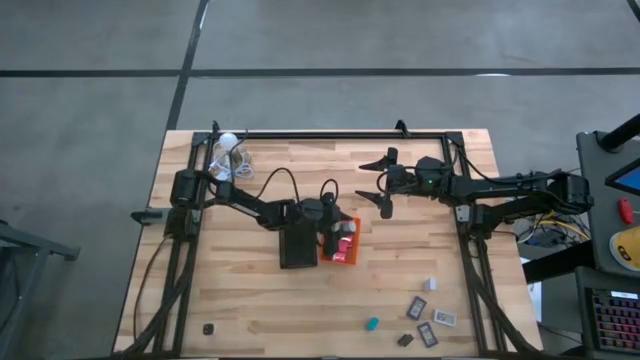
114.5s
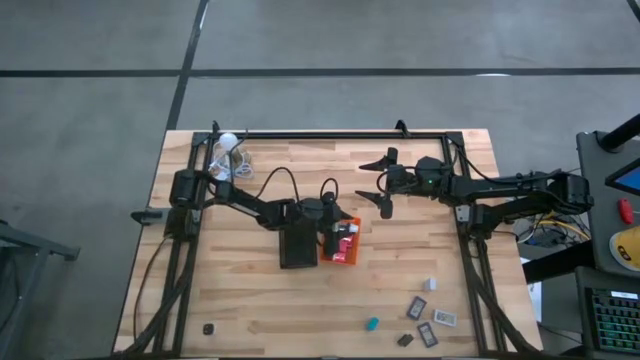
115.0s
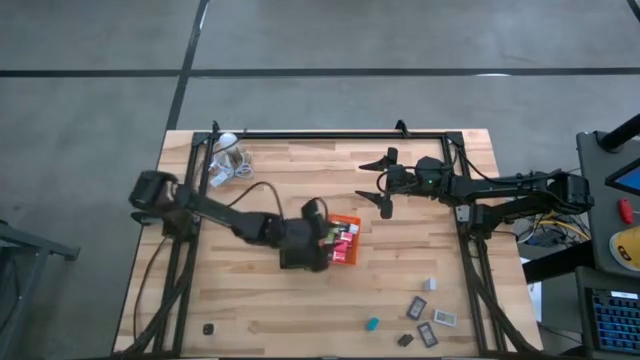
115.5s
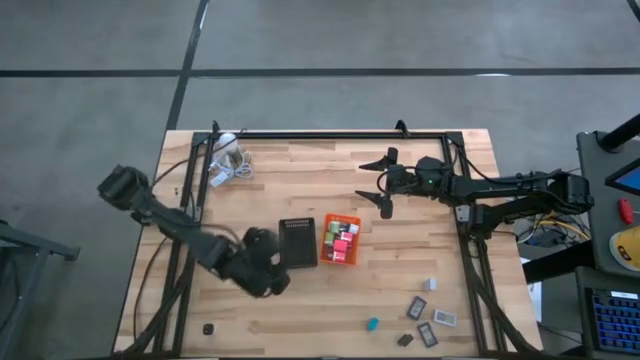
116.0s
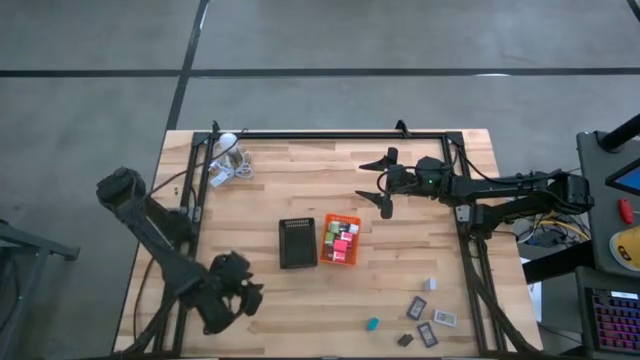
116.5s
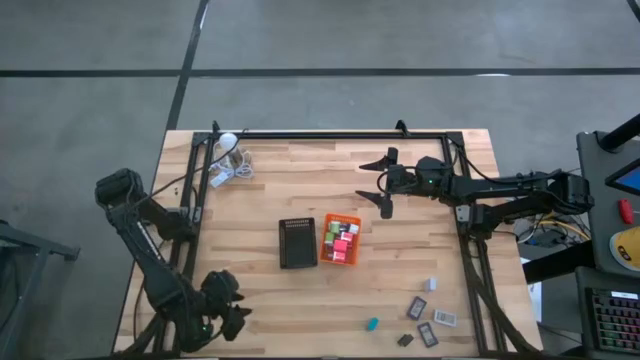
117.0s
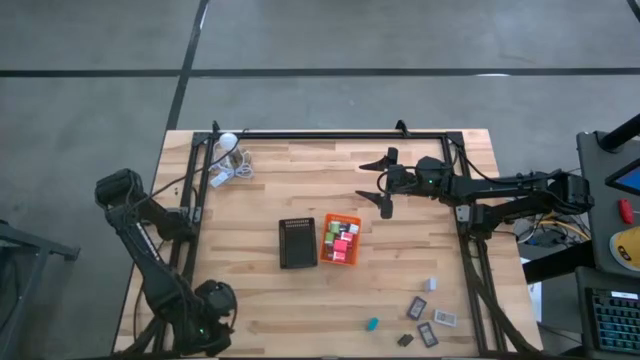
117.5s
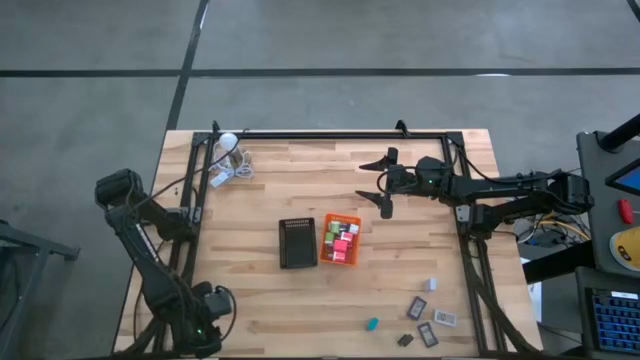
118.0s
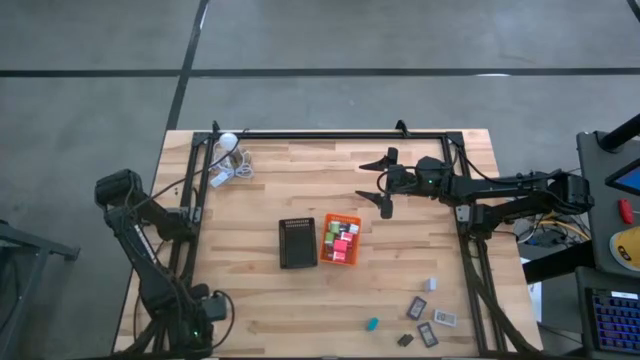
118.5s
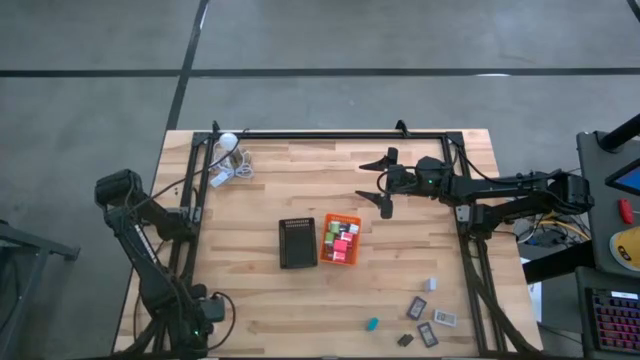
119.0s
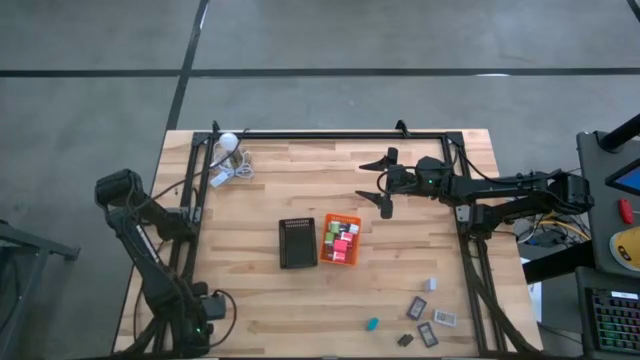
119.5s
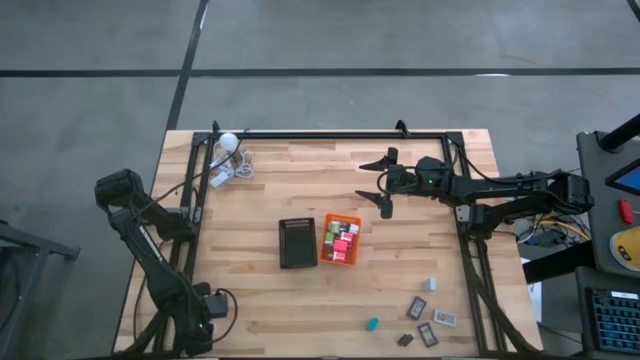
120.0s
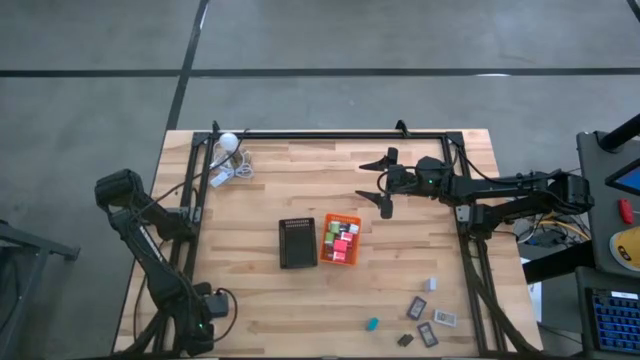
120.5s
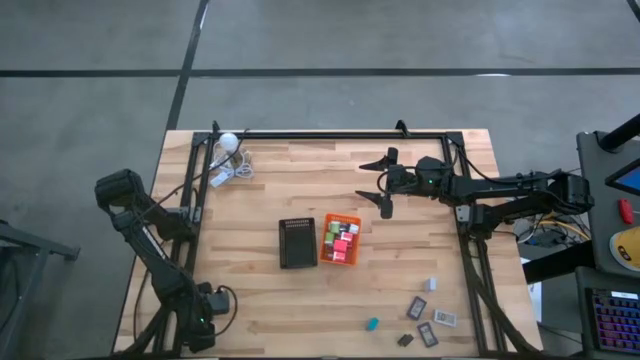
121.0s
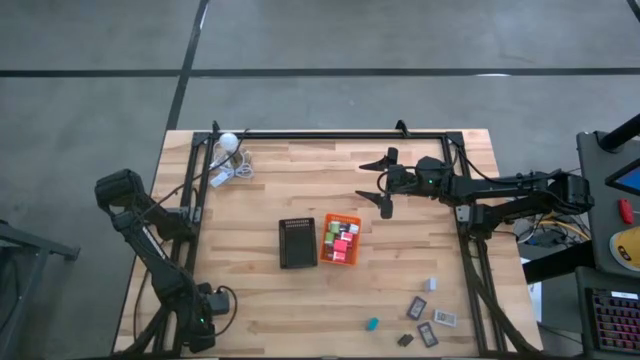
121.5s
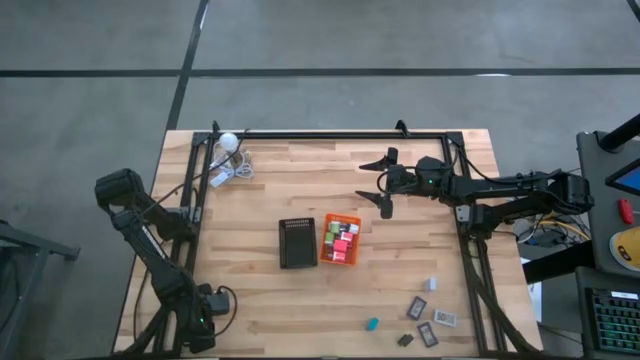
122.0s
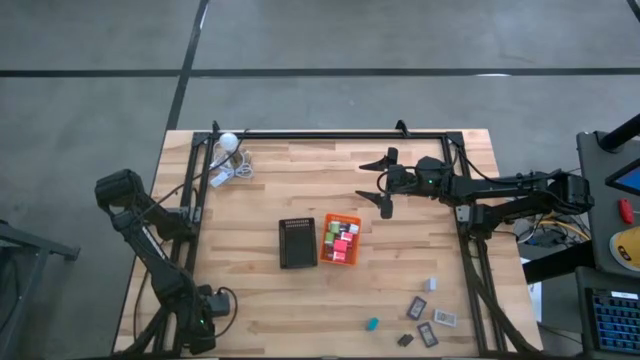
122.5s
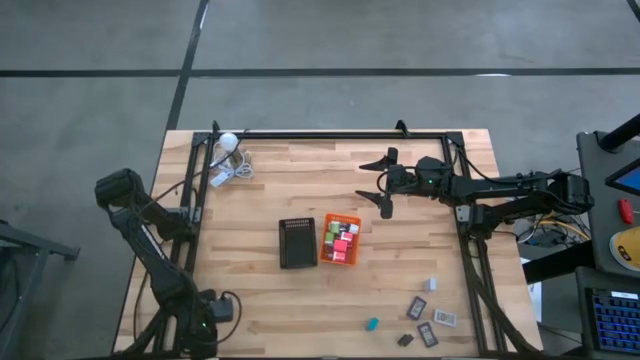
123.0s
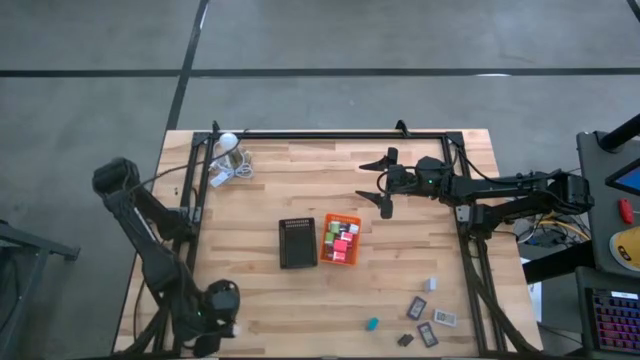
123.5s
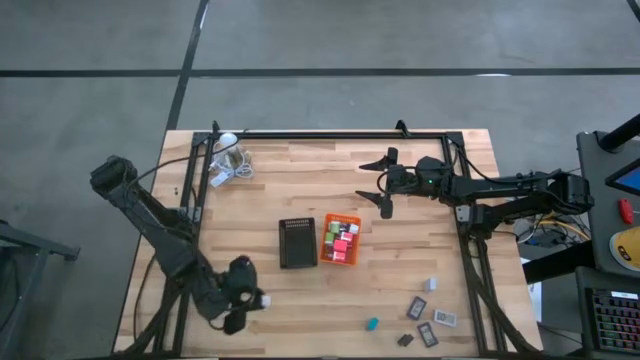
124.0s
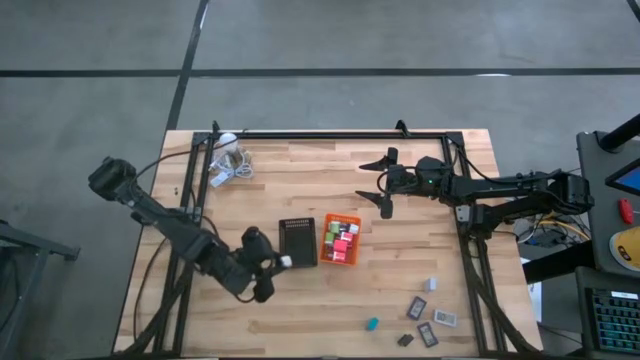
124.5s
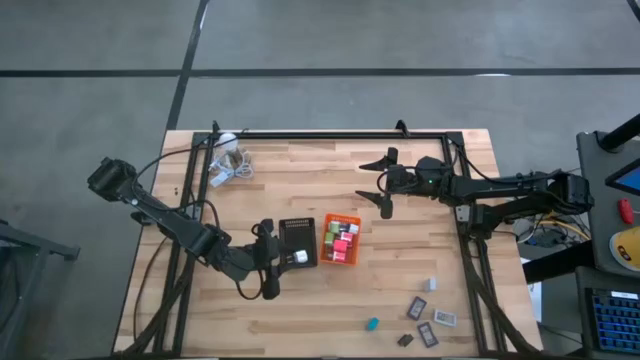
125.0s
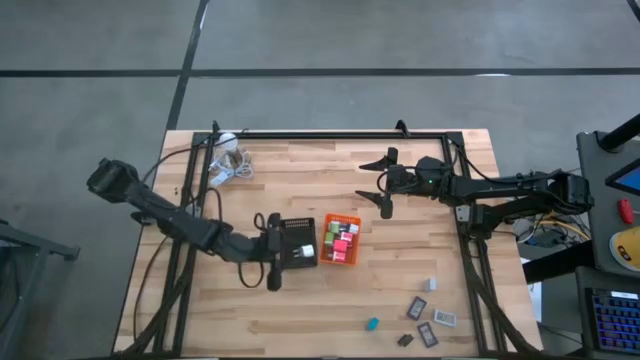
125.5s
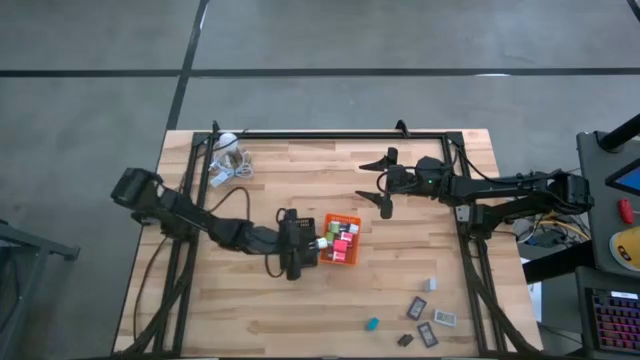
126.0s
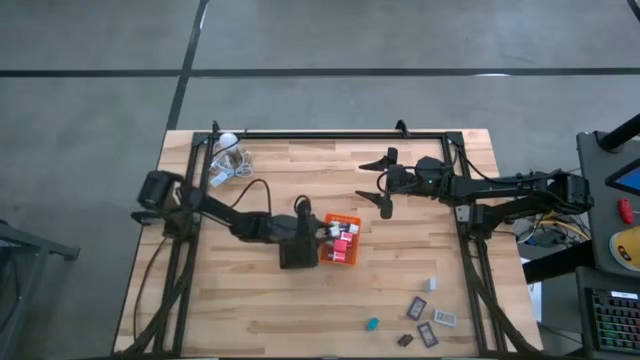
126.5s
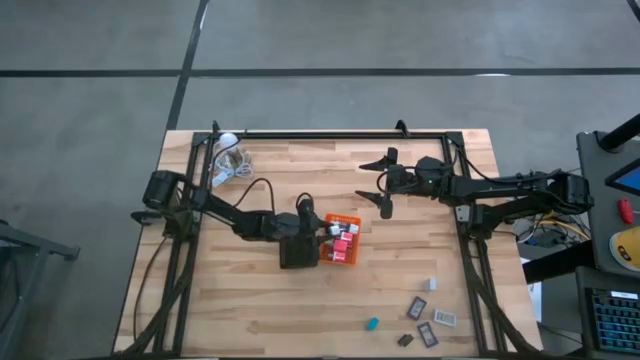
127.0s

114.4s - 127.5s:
Task: Pick & Place Office items
Put the white charger adapter into the orange bin

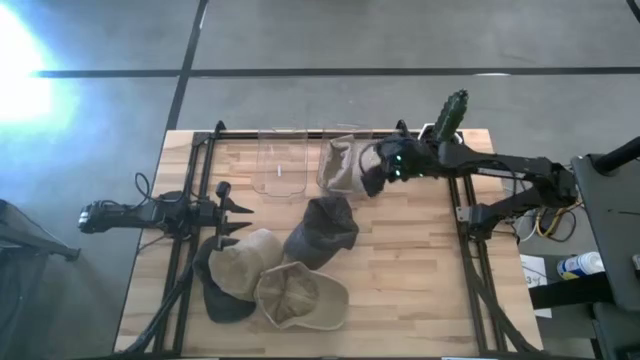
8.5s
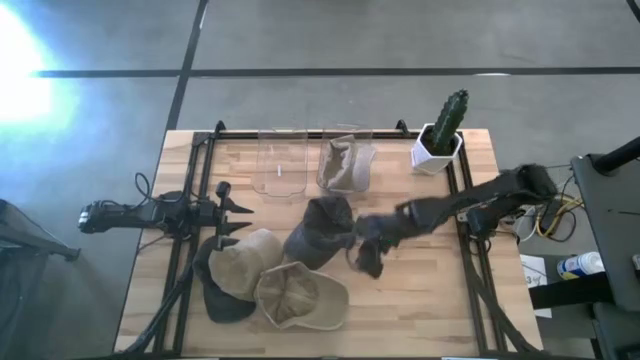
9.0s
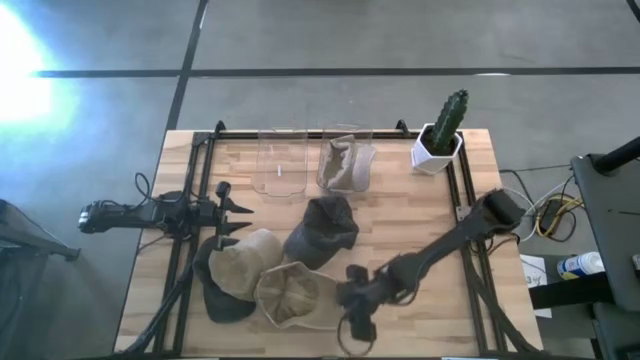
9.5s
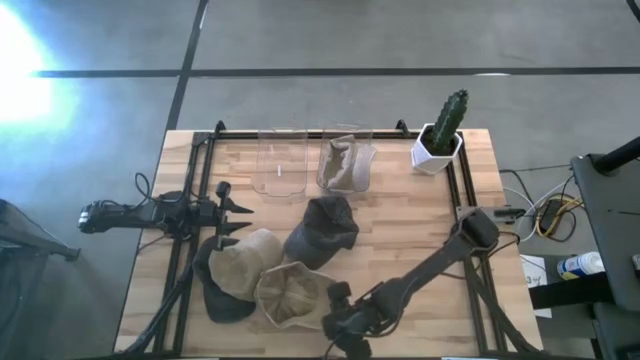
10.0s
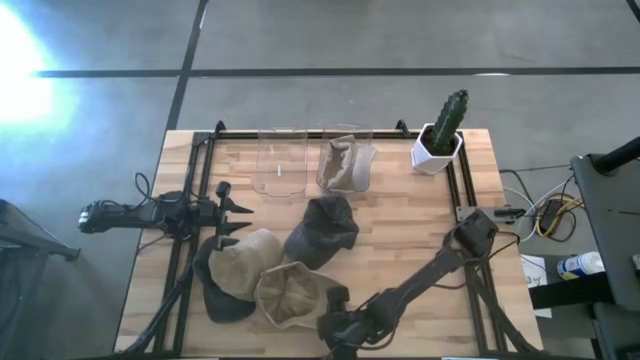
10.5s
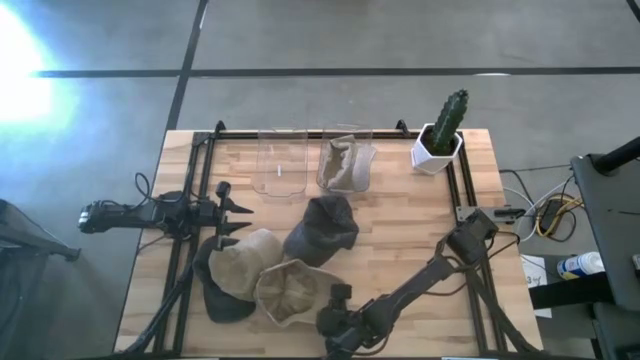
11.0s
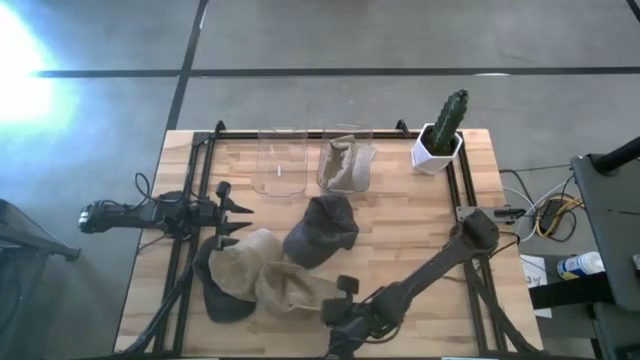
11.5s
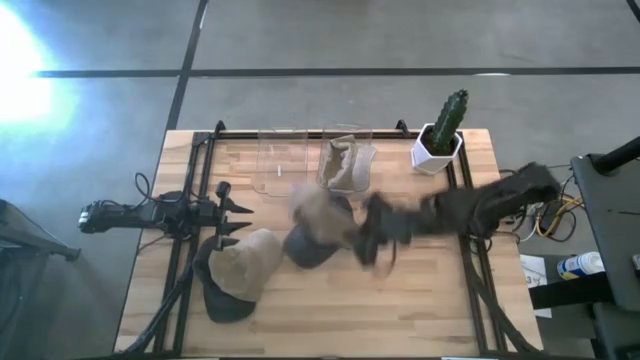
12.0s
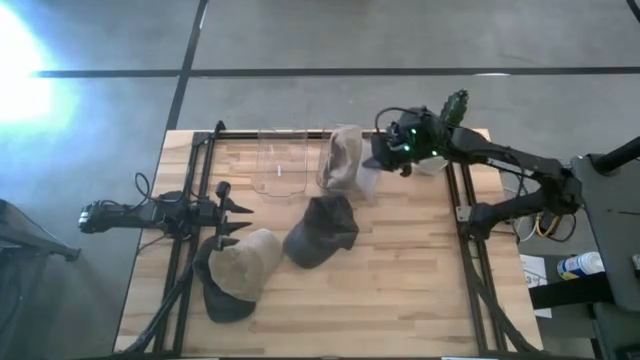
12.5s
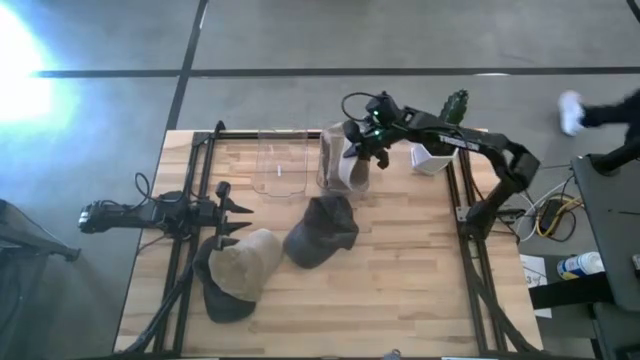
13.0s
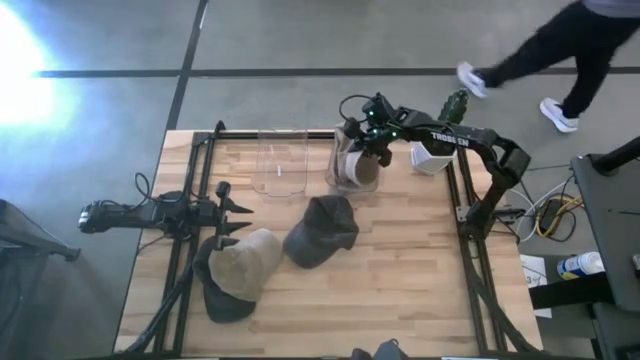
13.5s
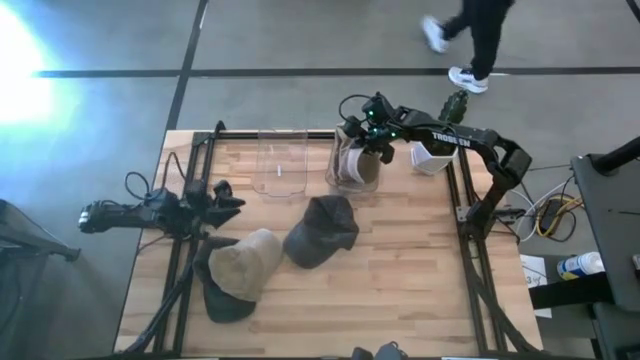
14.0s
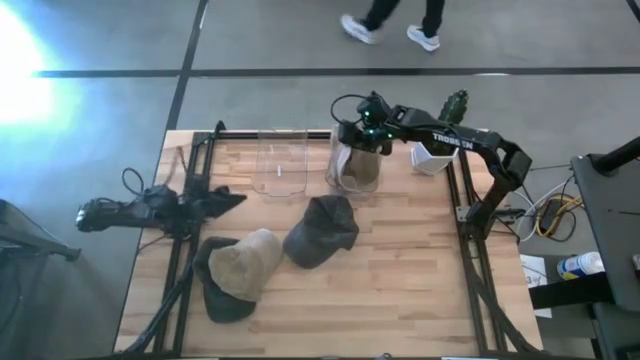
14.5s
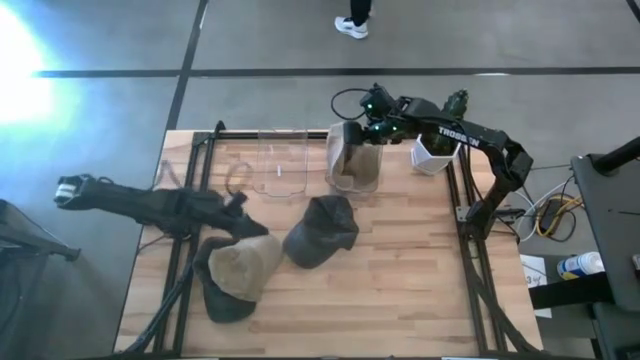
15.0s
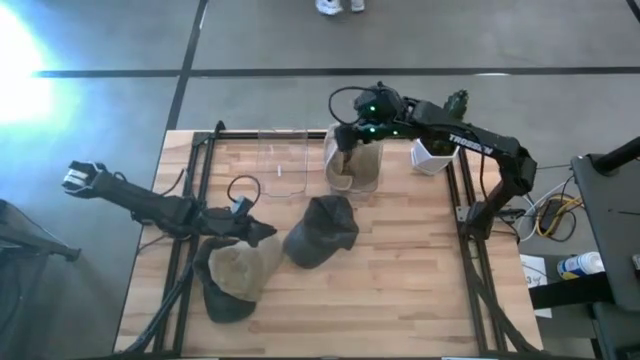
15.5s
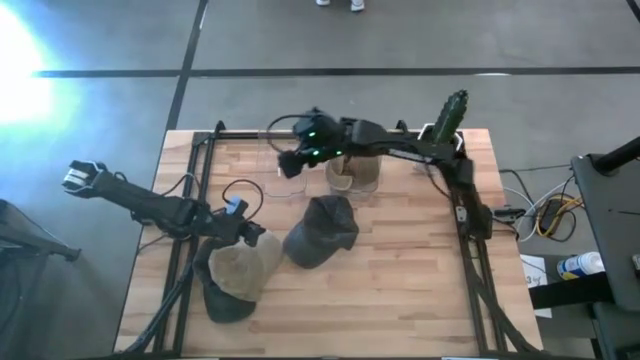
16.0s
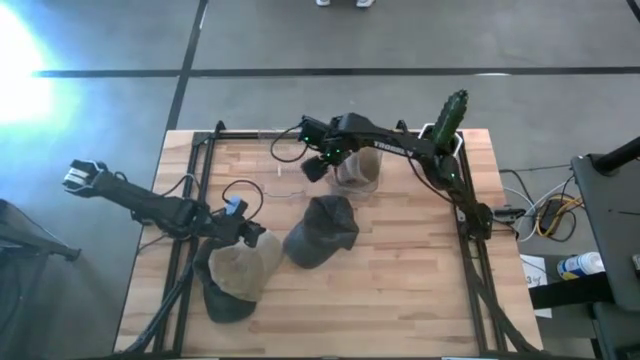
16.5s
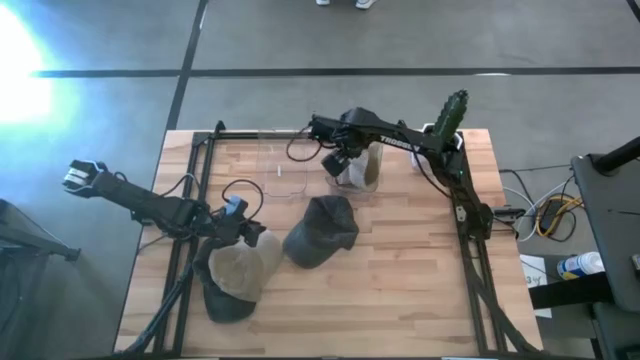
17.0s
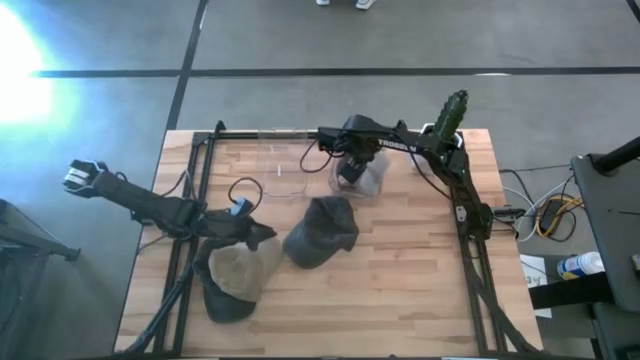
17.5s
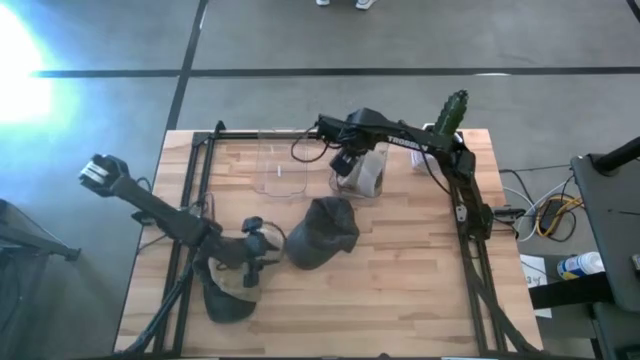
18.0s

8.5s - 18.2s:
Task: Pick & Place hat
Put the middle brown cap into the right transparent bin
